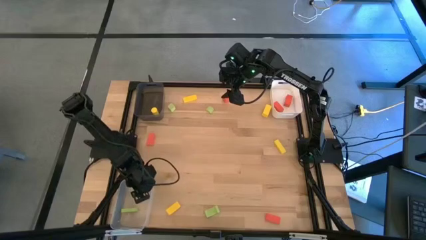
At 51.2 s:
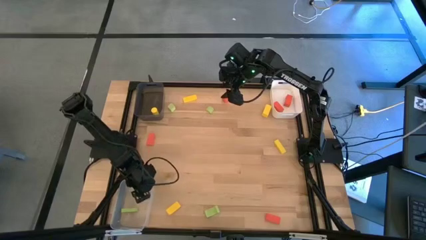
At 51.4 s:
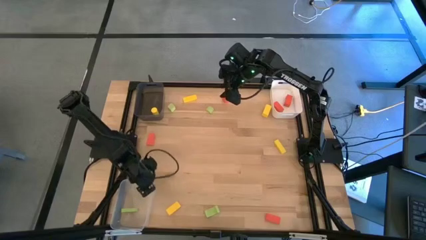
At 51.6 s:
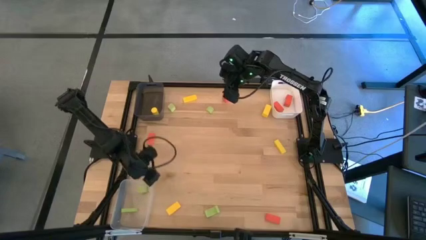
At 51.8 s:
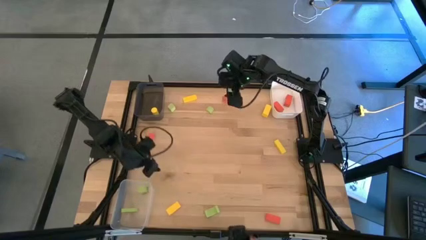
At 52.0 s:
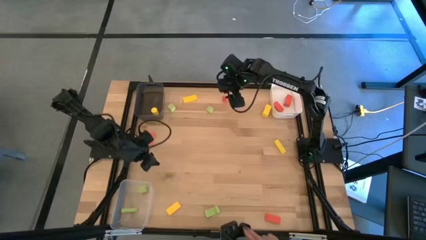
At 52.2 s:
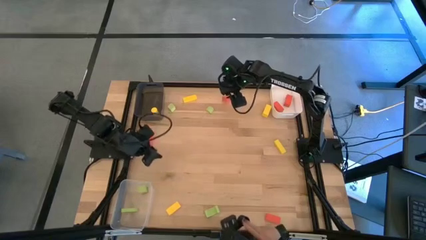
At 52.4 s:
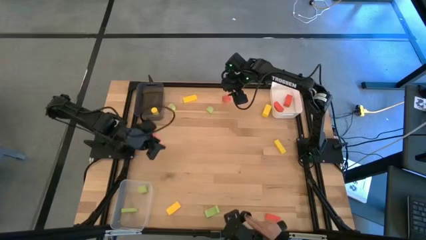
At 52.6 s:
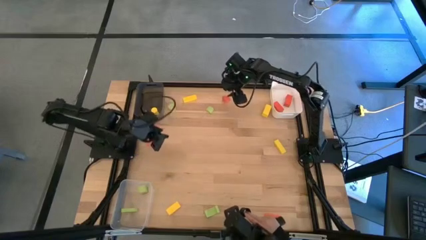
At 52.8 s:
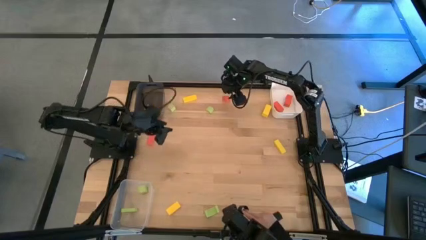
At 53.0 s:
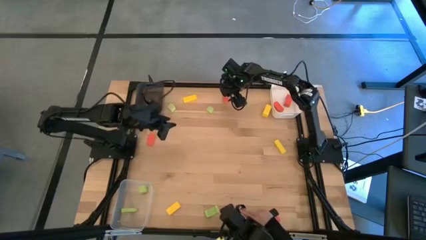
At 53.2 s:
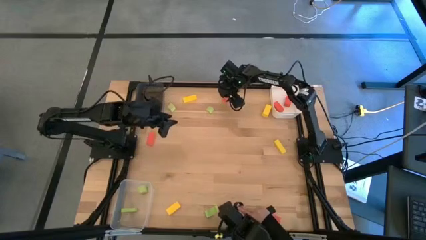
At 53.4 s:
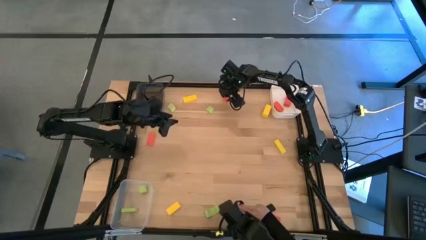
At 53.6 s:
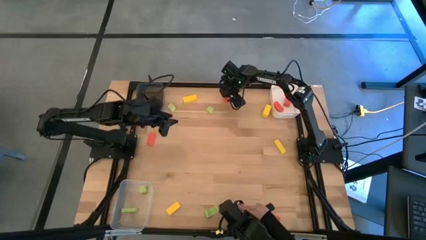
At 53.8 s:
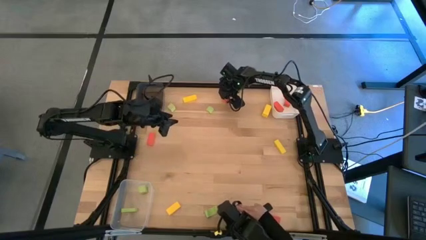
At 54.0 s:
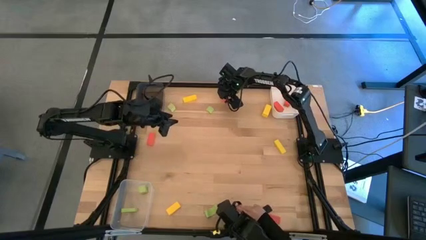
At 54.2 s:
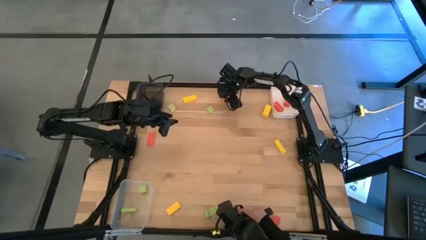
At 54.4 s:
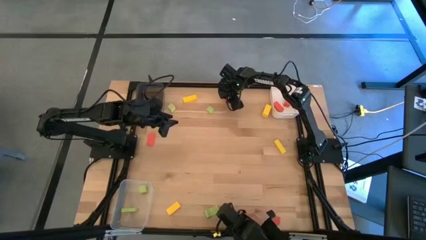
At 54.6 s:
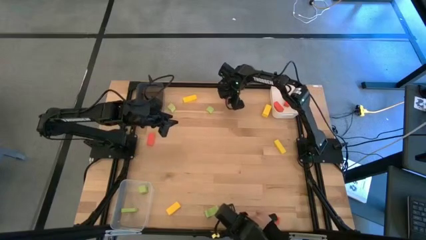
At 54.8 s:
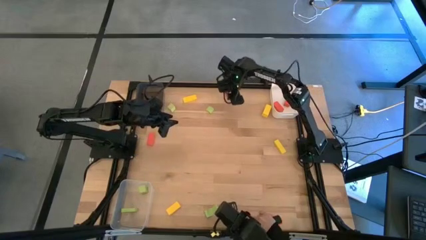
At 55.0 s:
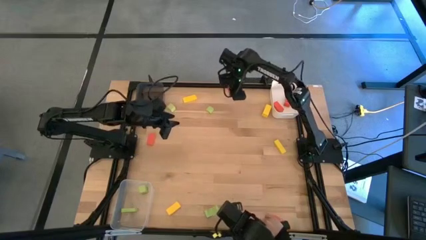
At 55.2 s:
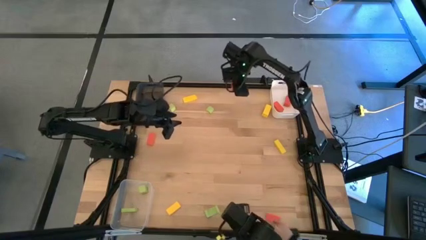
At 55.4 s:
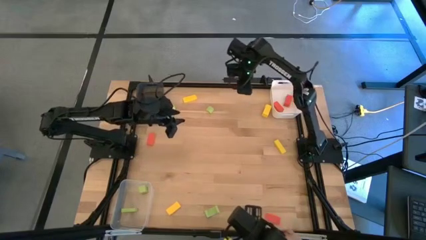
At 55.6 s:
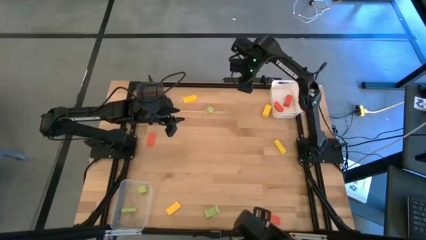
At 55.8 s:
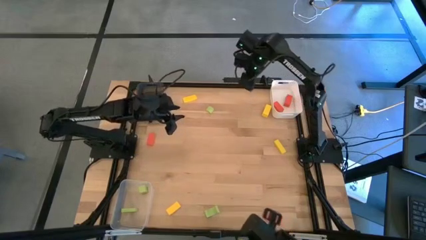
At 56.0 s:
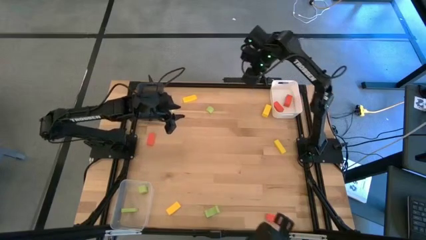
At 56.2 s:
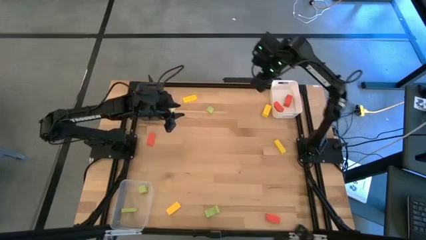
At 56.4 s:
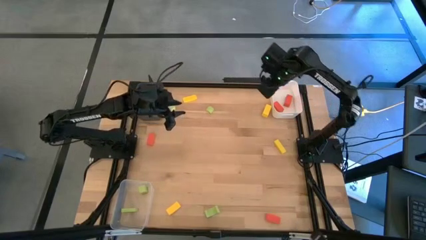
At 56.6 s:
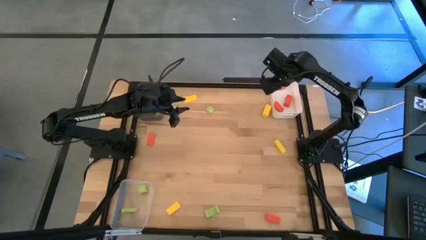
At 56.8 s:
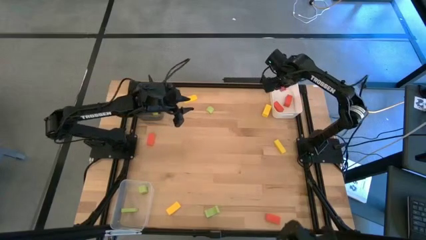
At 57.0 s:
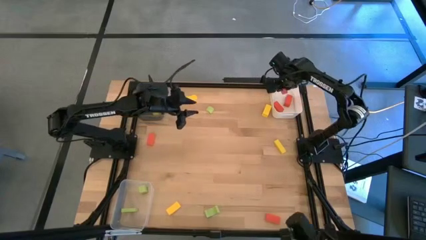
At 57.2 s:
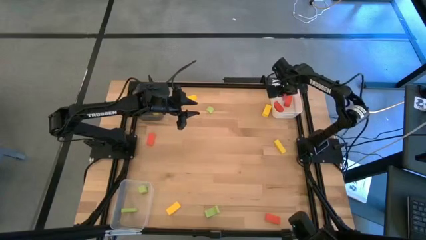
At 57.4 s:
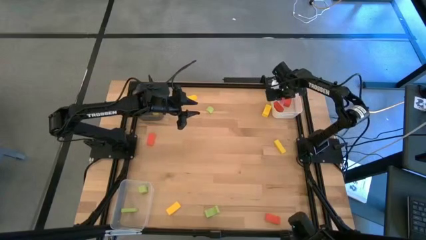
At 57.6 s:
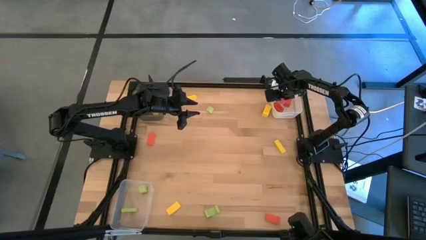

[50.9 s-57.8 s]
Task: Sort & place blocks by color
Put the orange block into the white bin

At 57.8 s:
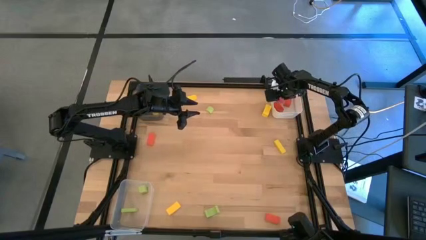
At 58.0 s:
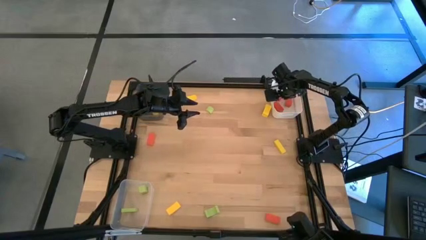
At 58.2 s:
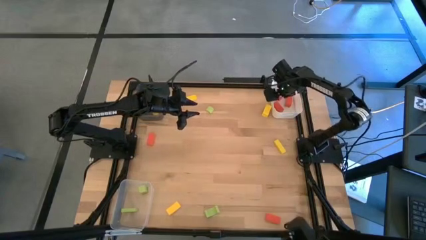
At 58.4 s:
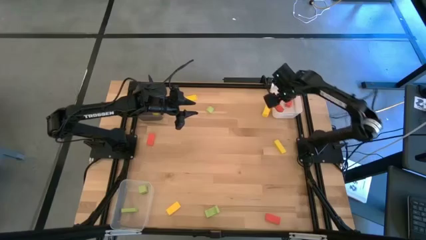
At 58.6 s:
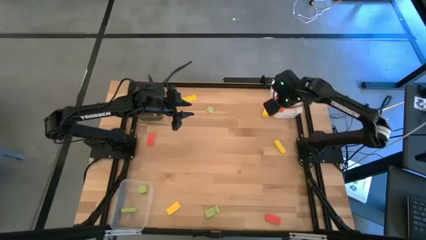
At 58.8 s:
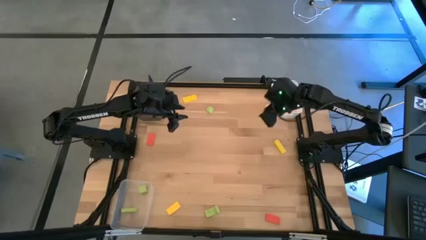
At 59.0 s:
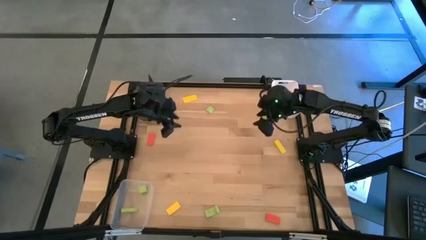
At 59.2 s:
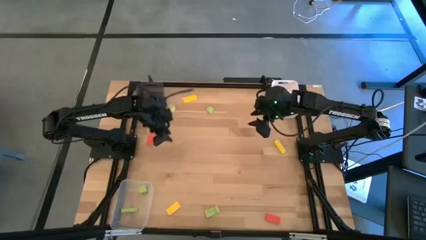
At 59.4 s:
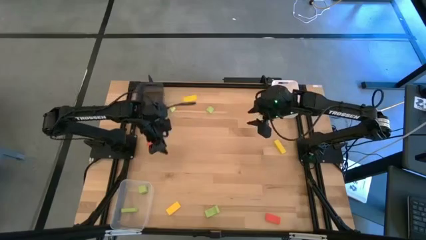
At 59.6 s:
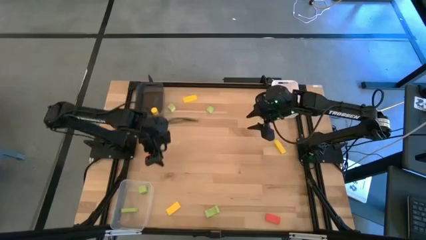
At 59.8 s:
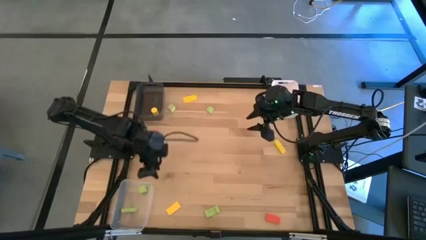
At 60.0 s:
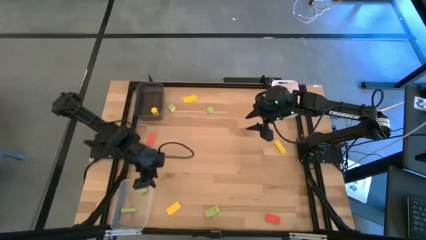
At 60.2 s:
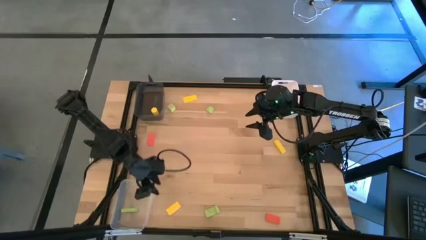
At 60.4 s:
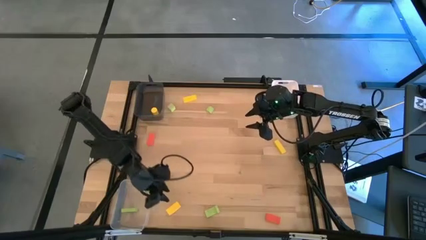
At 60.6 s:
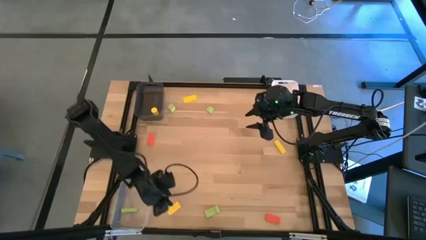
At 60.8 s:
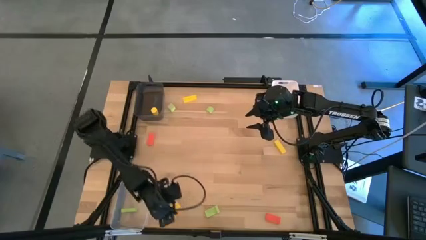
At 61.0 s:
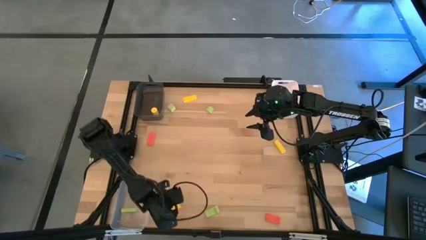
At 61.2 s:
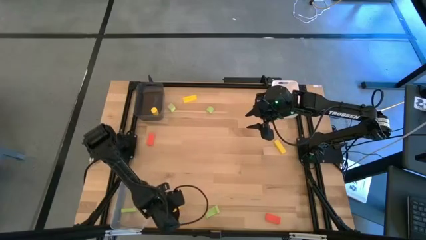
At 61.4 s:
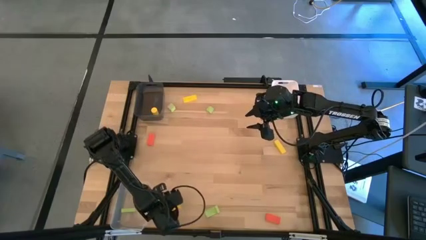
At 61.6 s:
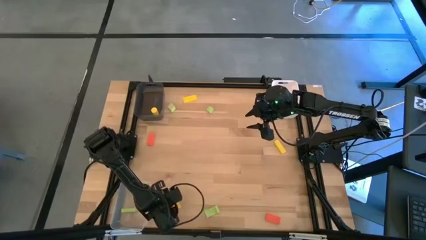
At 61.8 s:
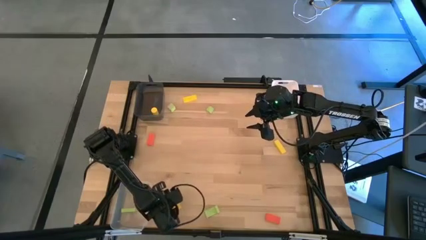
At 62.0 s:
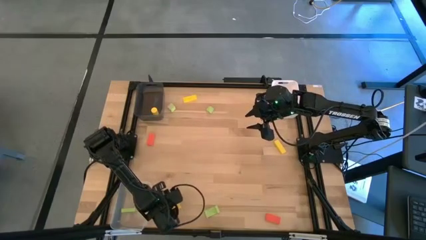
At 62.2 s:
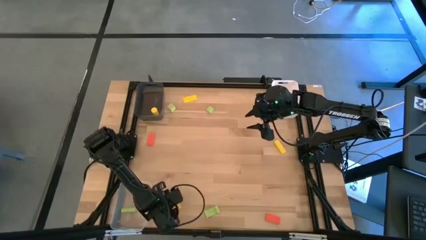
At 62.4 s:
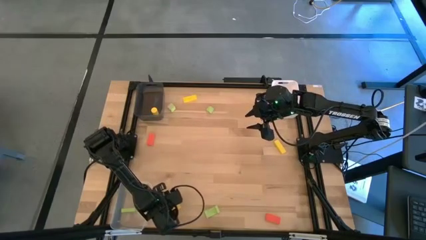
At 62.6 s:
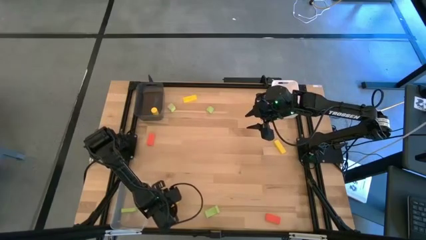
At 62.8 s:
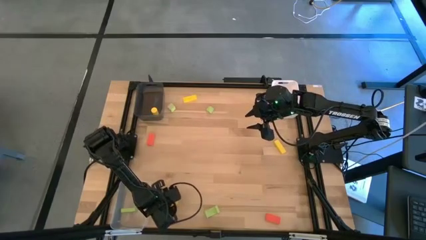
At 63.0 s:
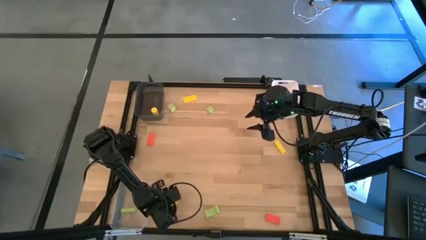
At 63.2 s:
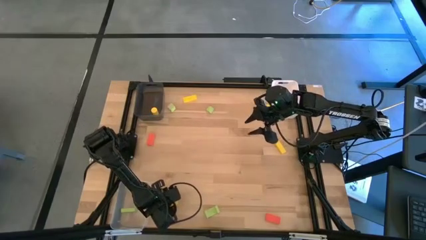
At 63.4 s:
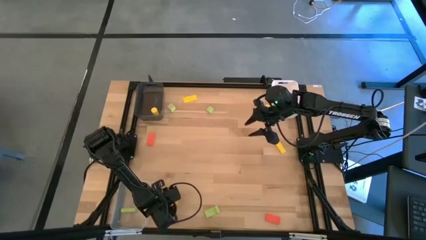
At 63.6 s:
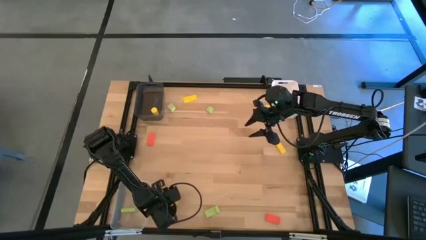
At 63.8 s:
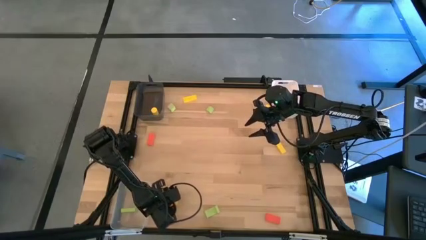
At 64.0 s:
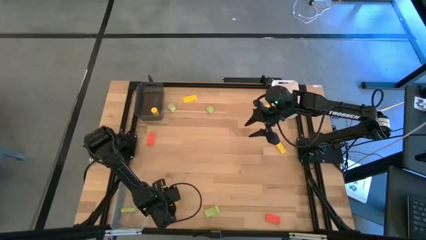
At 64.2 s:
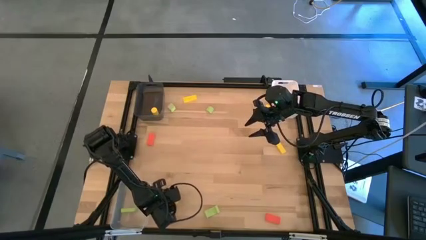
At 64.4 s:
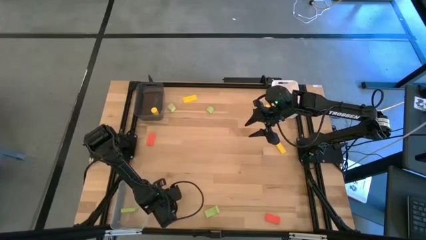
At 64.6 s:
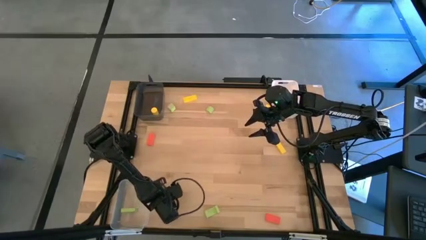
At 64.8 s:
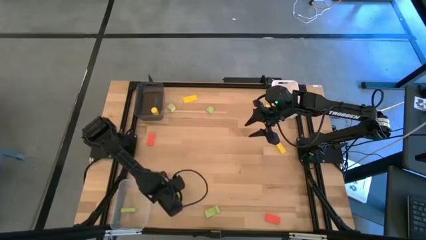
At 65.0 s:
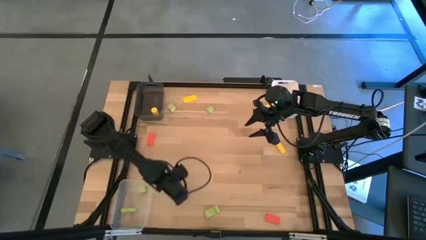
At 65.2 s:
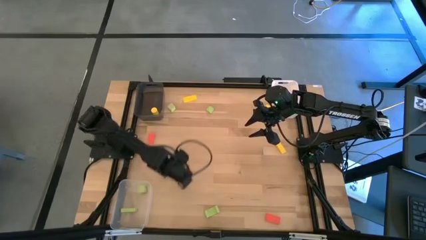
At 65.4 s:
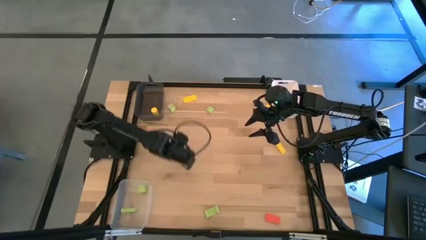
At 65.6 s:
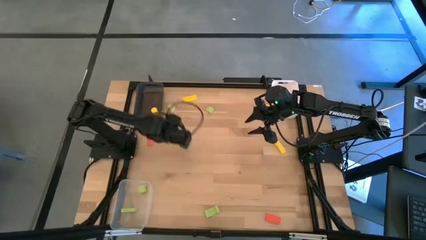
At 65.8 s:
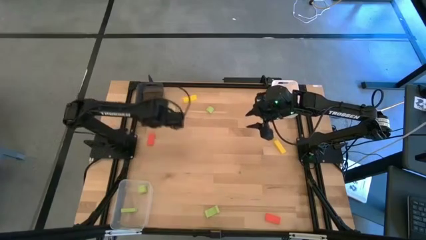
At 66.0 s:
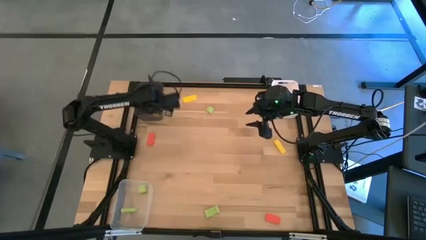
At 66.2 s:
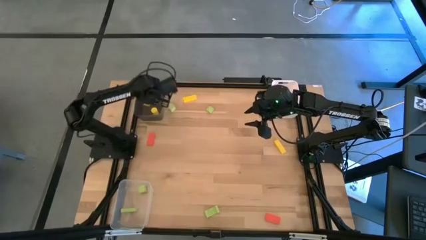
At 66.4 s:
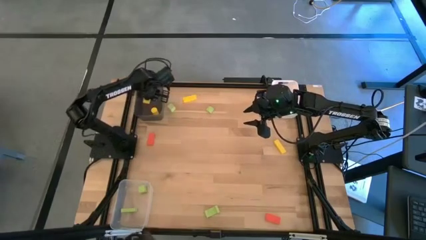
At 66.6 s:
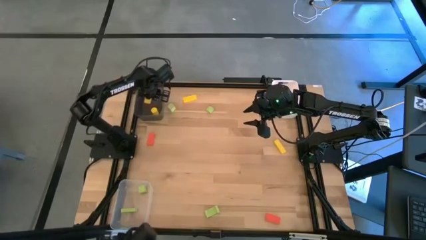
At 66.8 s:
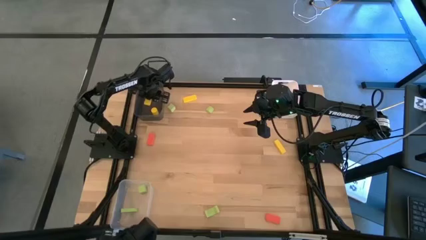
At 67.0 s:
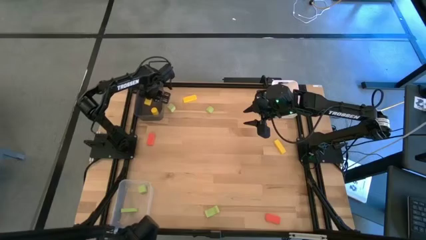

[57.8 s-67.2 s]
Put the yellow block into the black bin

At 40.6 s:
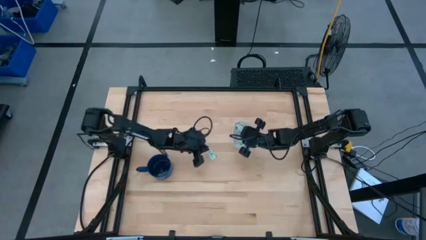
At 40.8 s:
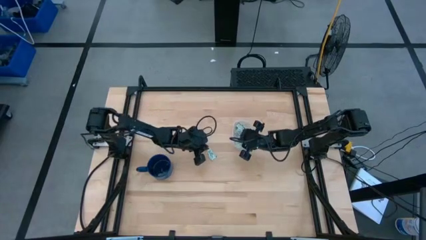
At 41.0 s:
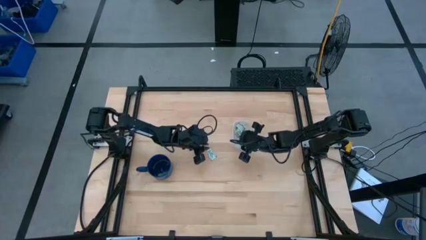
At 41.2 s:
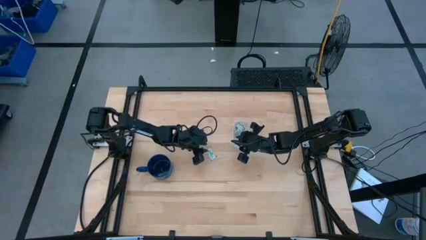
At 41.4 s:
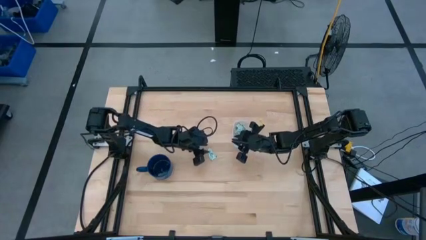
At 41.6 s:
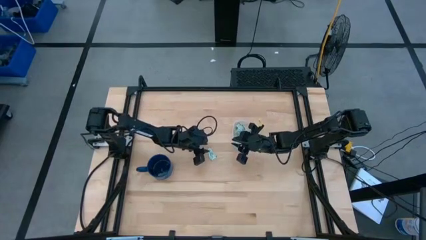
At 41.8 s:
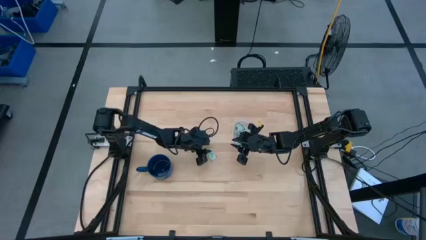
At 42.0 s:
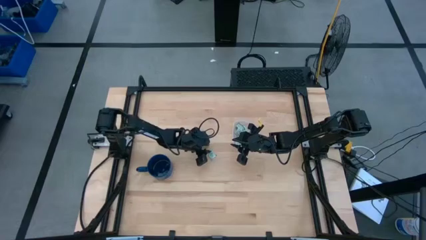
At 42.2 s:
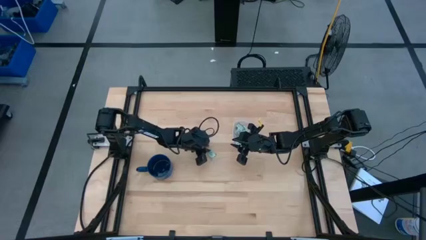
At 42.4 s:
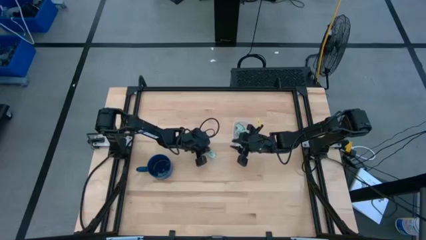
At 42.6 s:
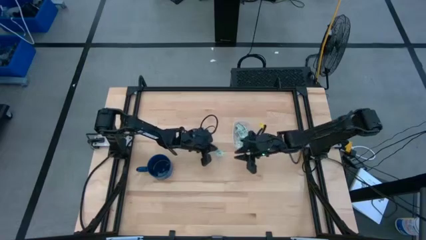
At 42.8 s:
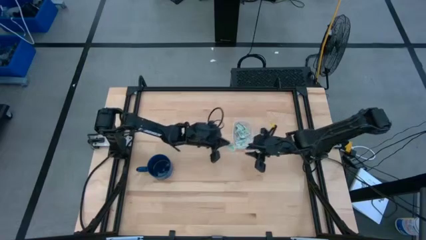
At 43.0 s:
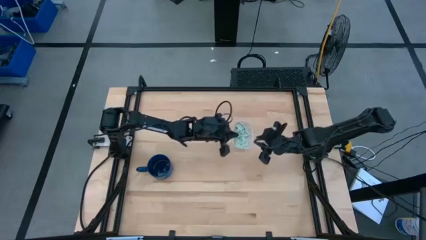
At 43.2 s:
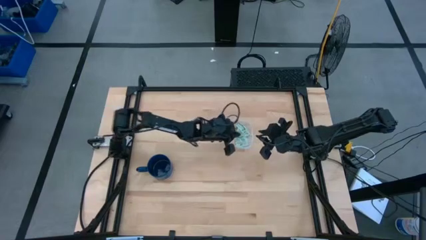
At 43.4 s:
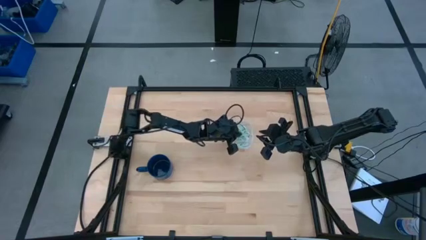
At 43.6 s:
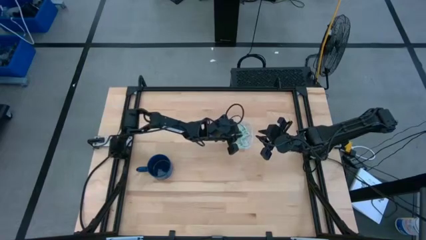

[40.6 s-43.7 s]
Task: Pick and place Stevia / Truvia into bins
Put the light green stevia packet into the transparent container
